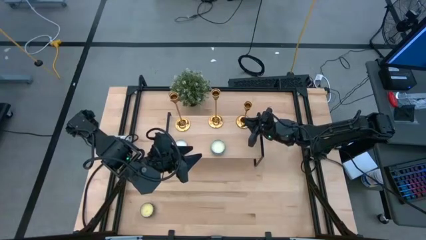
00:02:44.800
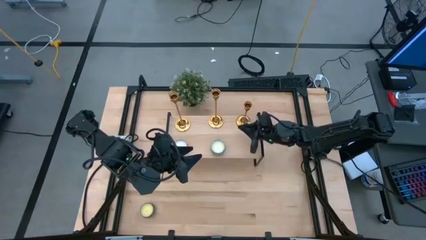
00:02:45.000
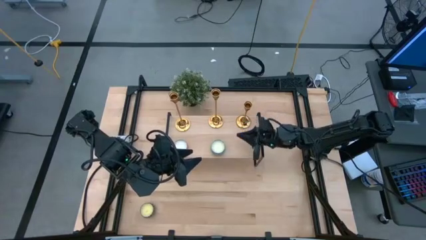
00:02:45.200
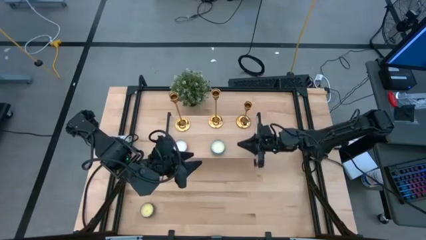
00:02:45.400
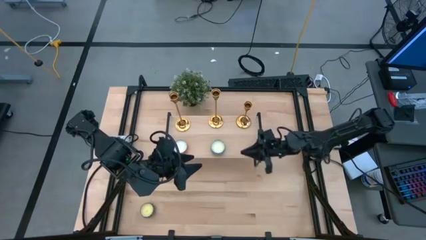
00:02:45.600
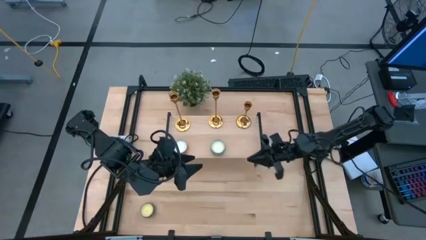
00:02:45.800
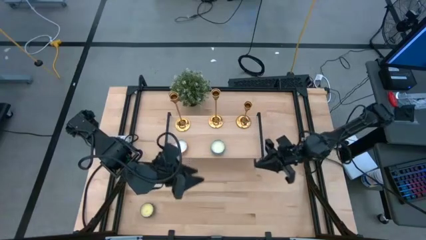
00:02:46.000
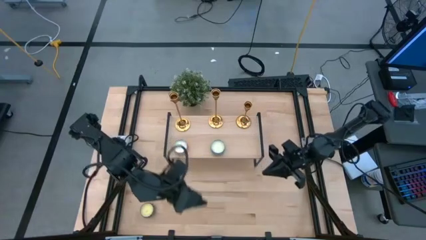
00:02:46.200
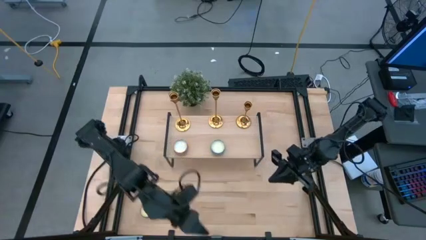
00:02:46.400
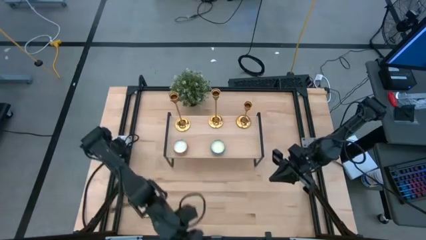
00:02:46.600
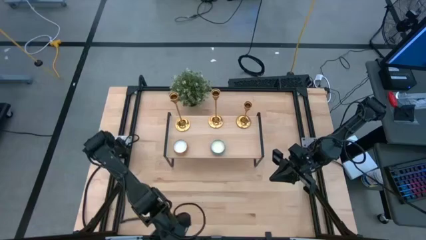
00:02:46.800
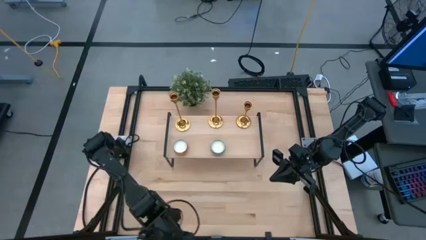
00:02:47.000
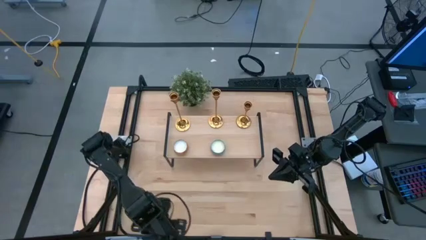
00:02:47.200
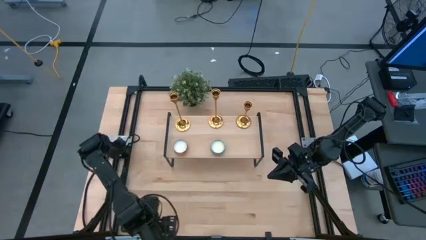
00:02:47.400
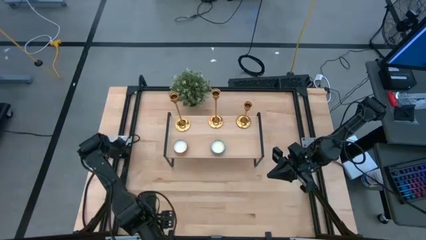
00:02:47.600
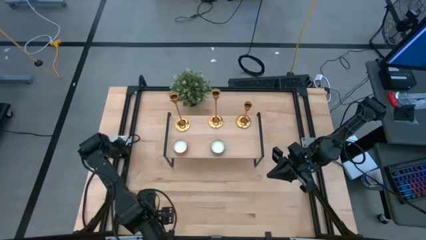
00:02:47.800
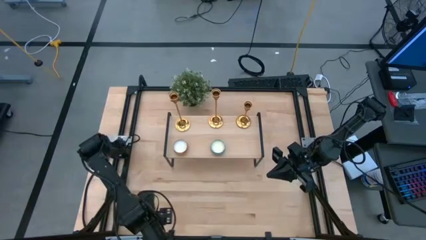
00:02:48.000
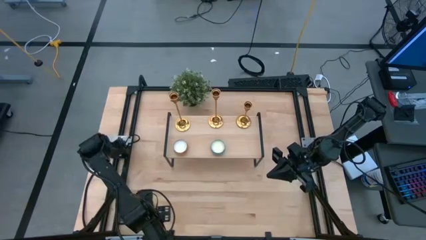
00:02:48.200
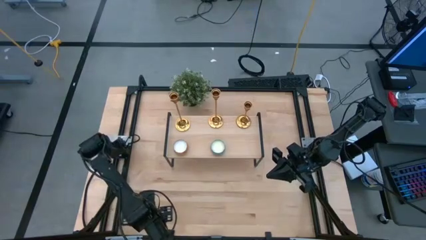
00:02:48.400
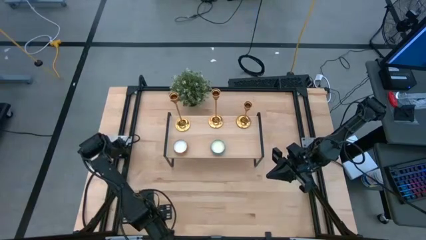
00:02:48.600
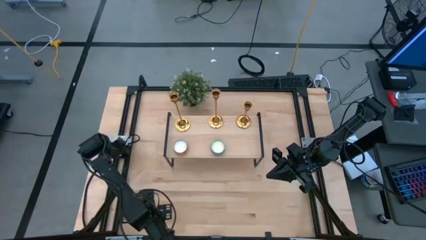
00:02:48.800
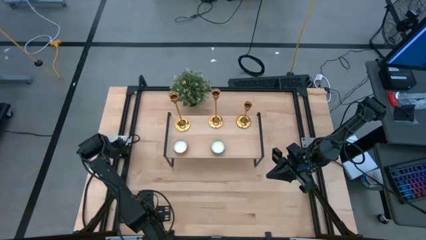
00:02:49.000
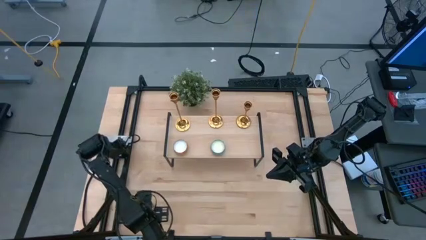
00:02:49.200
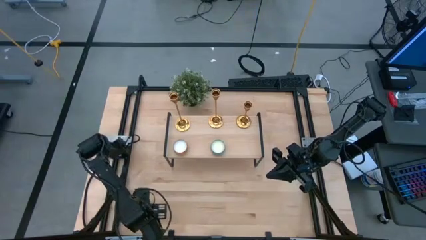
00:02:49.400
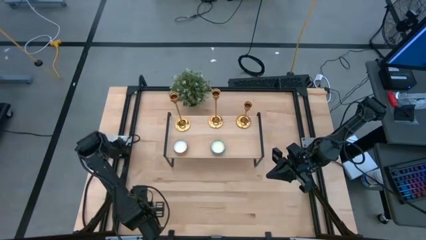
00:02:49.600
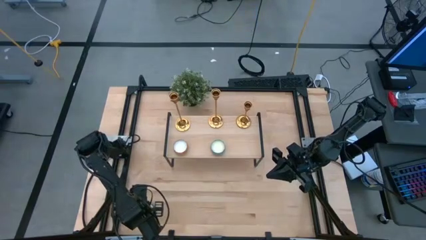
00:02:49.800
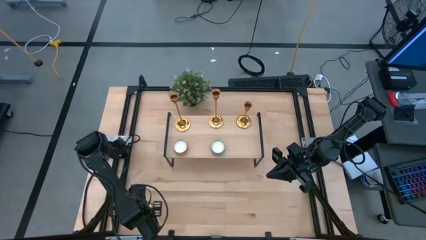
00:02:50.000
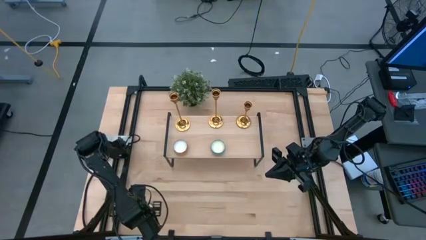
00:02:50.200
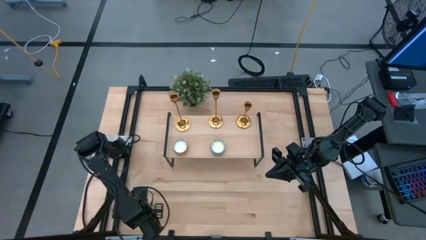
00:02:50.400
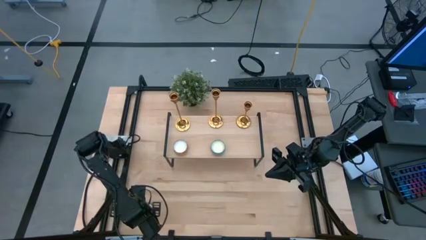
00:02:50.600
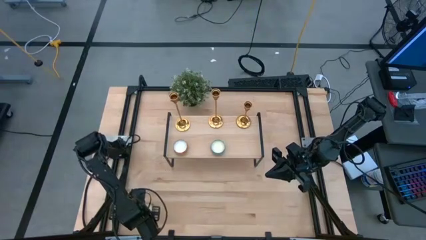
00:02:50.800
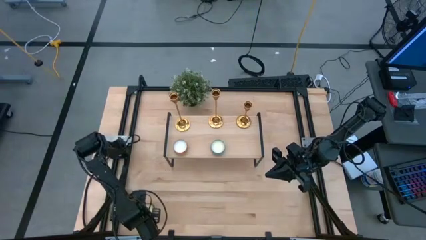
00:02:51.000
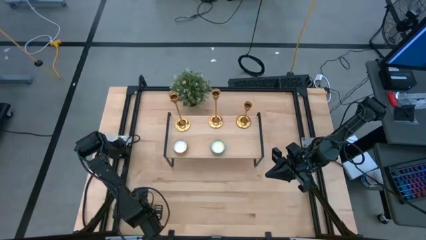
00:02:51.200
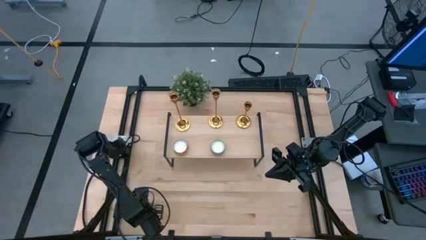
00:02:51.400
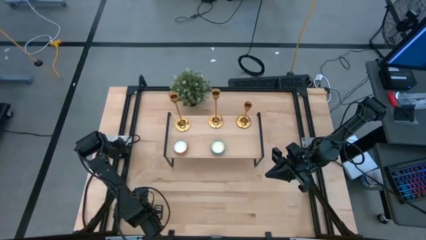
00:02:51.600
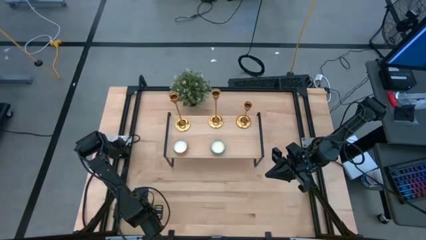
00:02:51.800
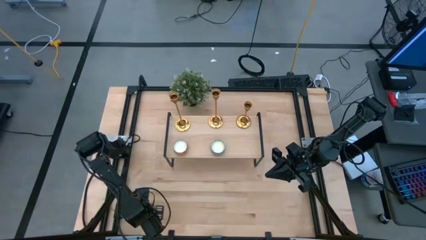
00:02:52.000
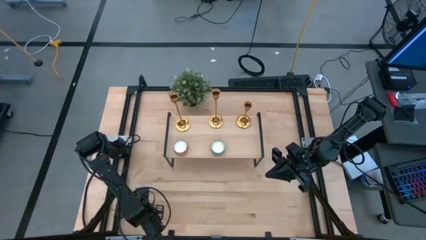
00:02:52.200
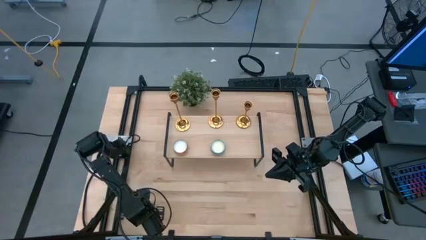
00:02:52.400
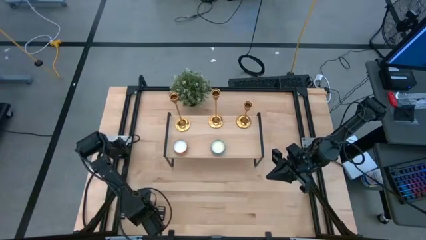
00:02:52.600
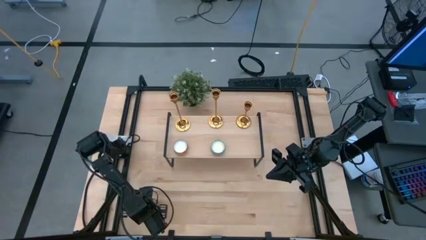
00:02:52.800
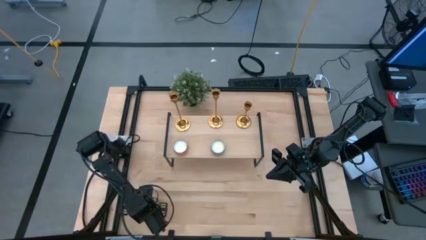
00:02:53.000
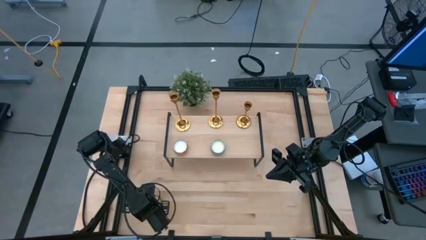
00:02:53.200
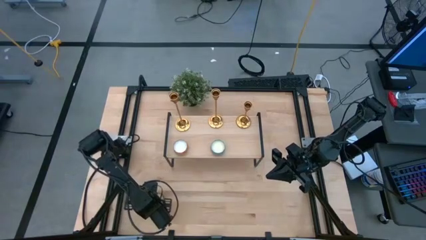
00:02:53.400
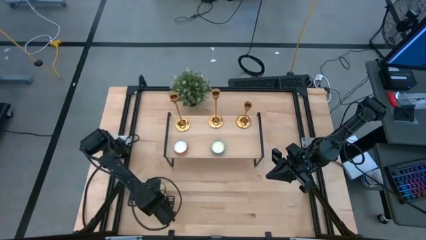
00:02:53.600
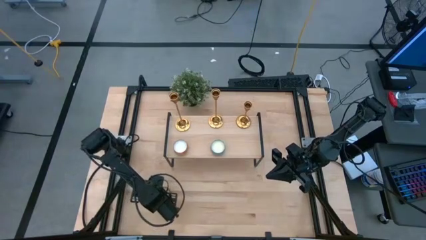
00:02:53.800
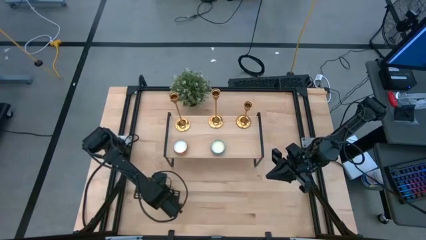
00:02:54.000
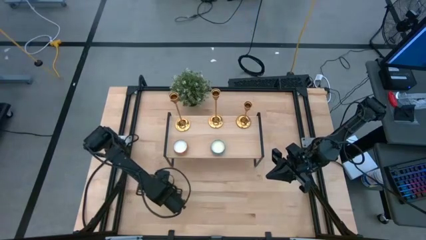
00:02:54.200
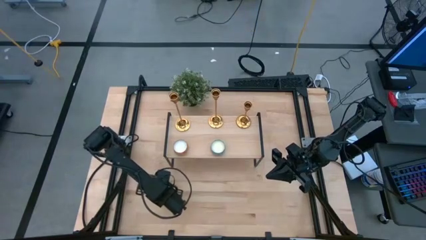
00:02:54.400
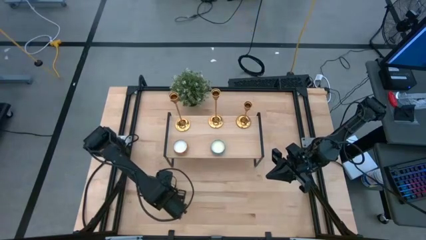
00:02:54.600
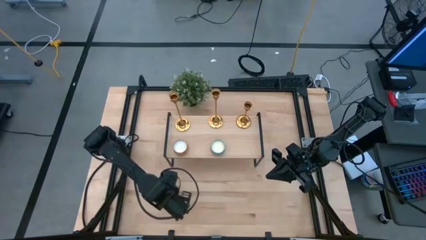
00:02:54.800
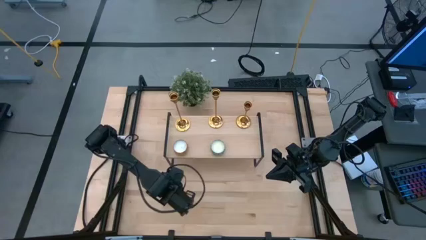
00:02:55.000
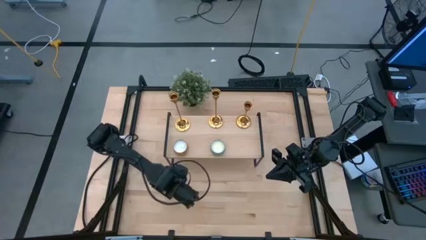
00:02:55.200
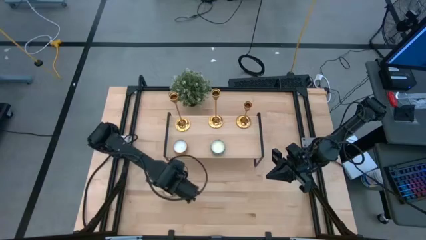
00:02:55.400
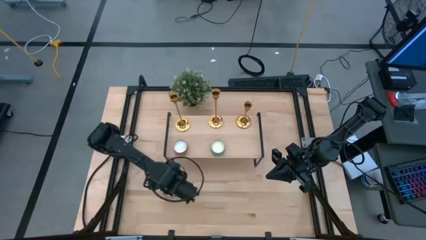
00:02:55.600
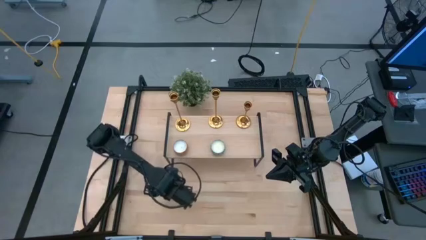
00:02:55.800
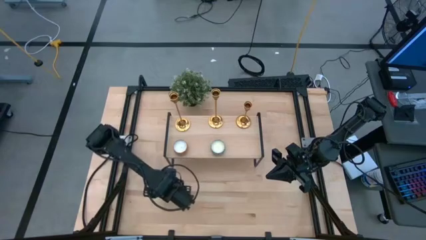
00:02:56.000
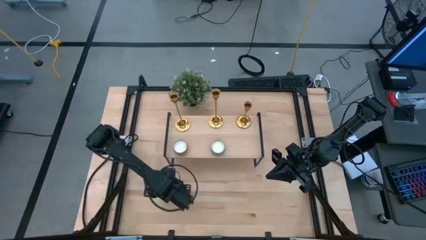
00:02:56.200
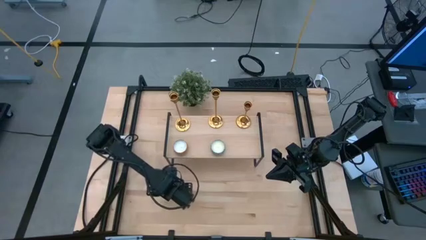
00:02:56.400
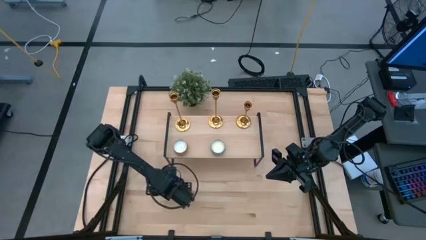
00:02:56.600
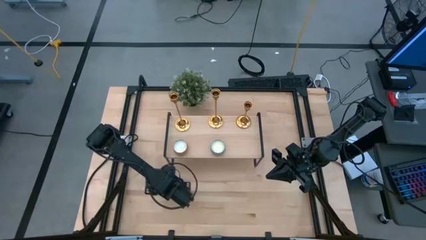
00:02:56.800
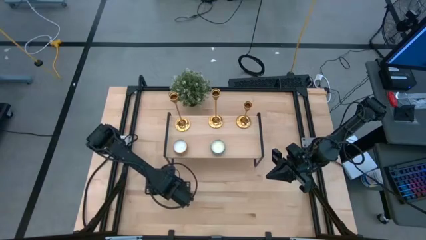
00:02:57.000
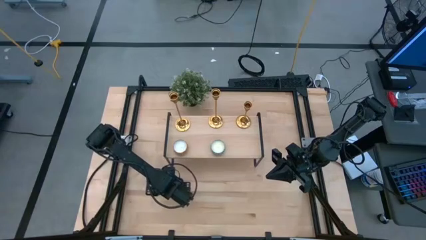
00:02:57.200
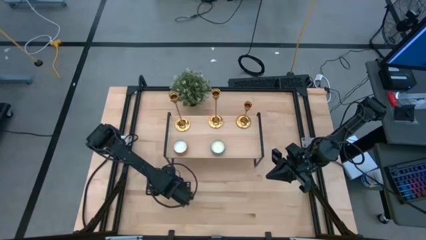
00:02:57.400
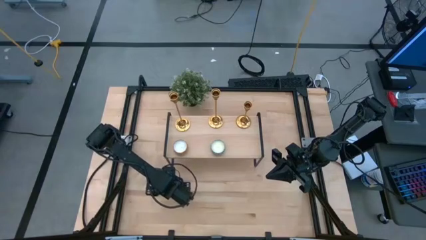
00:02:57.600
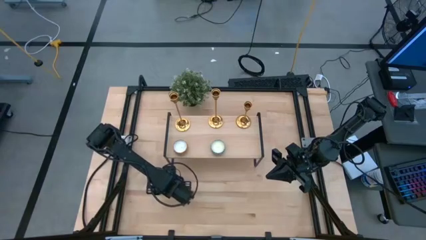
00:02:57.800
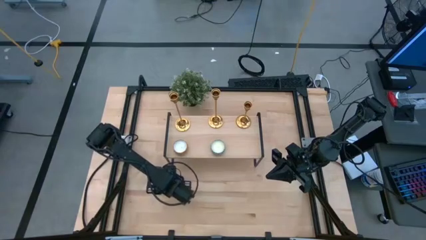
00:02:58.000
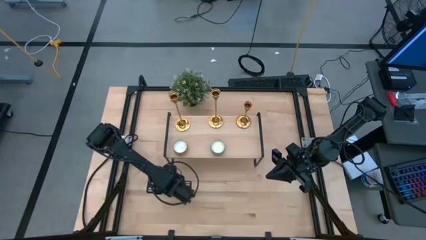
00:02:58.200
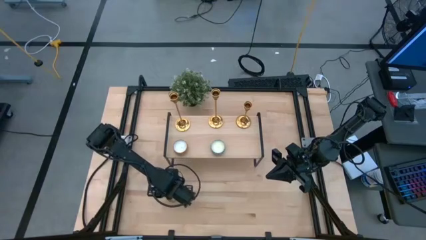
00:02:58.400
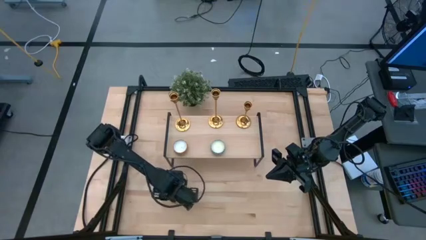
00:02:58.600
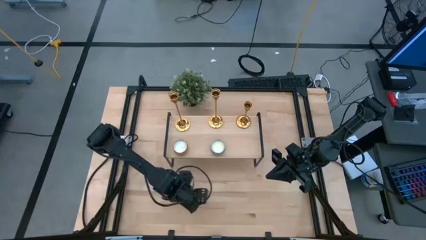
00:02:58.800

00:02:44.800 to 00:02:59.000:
Task: Stock candles and holders on shelf
Align the red scented candle with the other scented candles on the shelf
